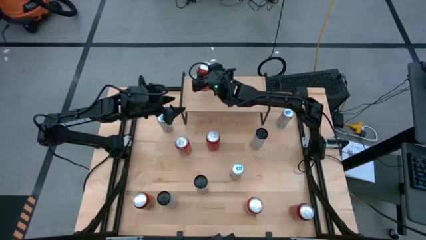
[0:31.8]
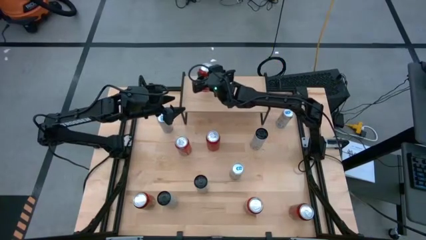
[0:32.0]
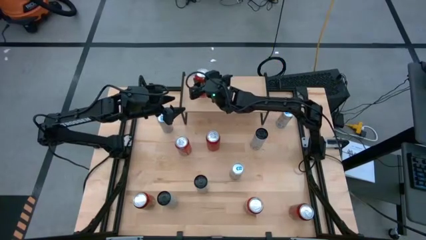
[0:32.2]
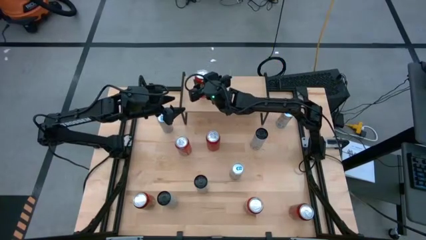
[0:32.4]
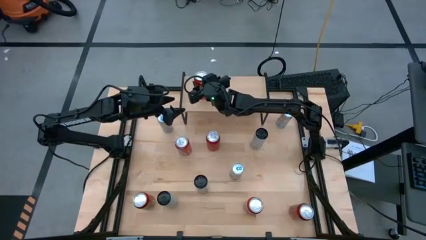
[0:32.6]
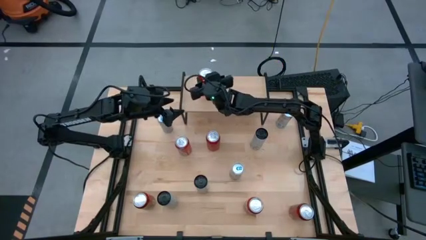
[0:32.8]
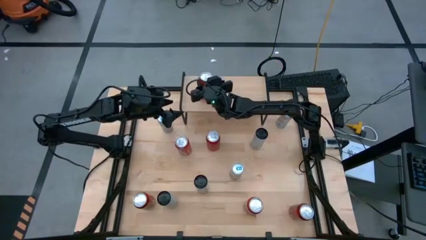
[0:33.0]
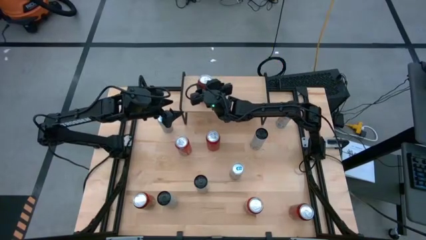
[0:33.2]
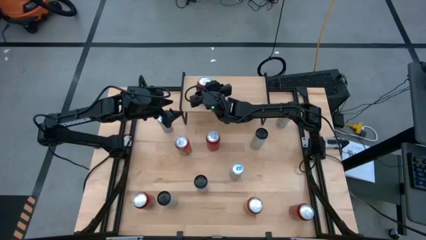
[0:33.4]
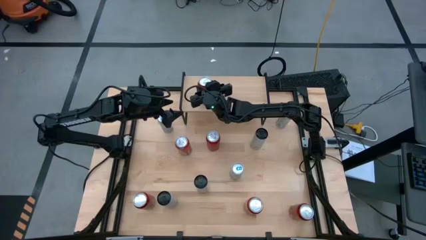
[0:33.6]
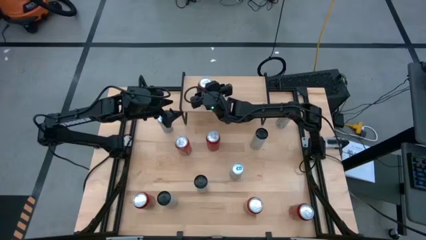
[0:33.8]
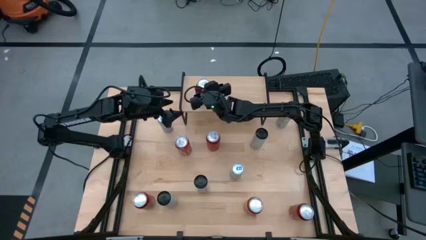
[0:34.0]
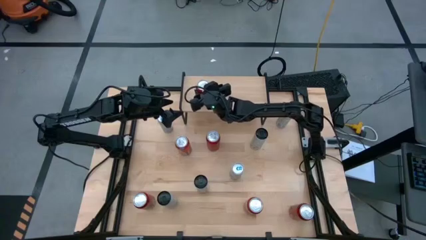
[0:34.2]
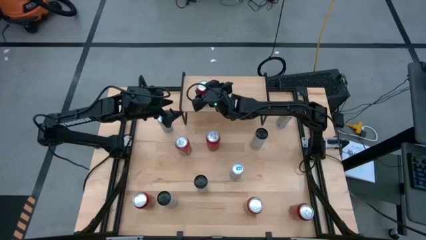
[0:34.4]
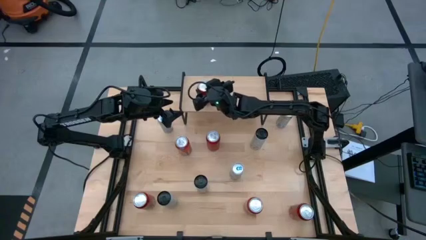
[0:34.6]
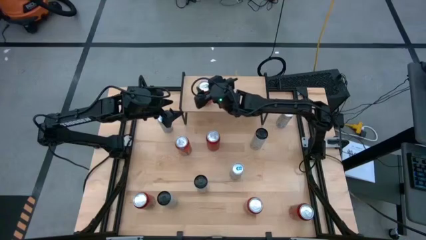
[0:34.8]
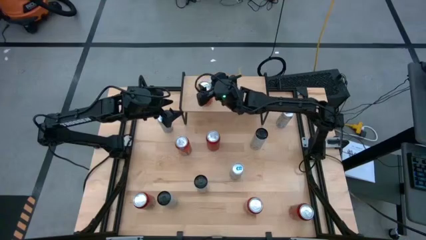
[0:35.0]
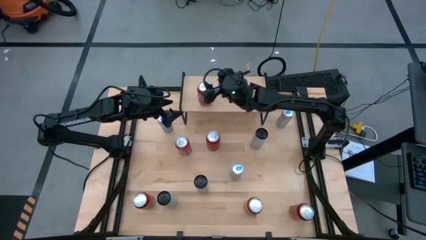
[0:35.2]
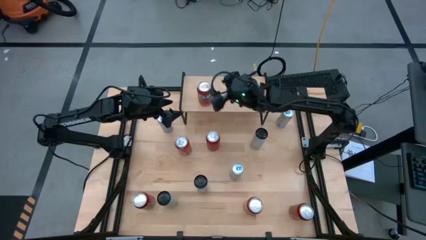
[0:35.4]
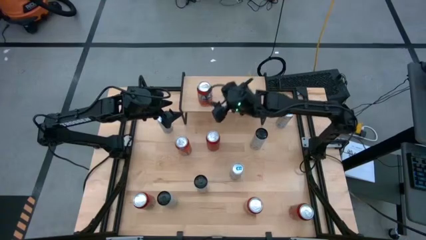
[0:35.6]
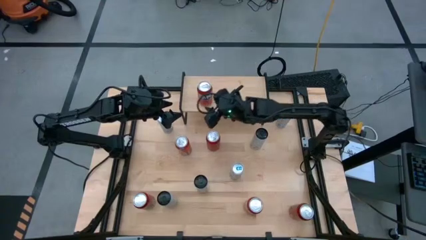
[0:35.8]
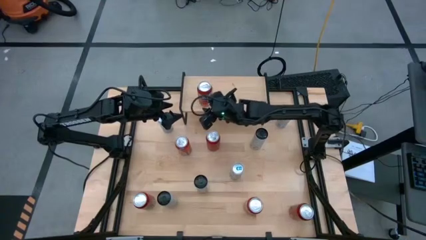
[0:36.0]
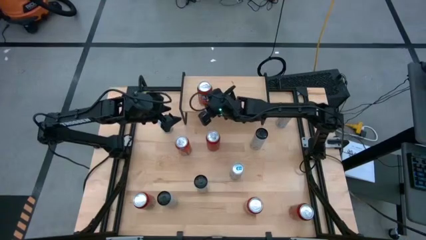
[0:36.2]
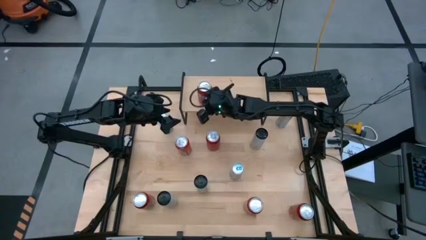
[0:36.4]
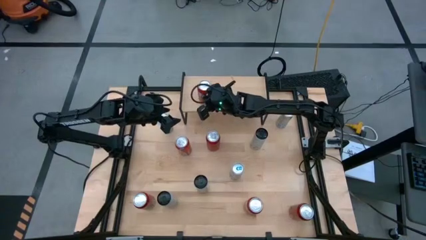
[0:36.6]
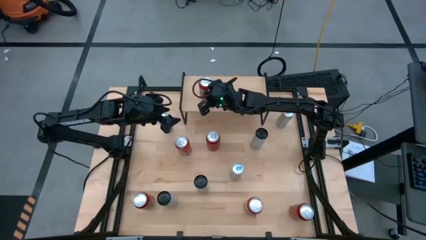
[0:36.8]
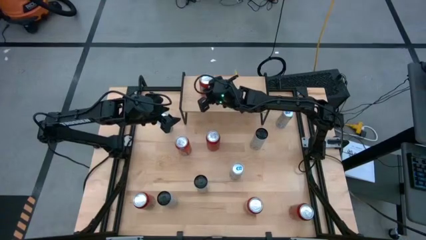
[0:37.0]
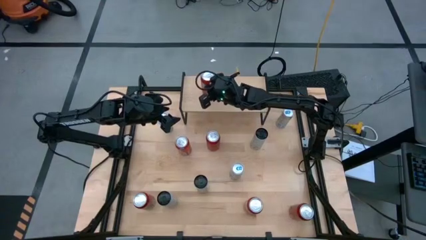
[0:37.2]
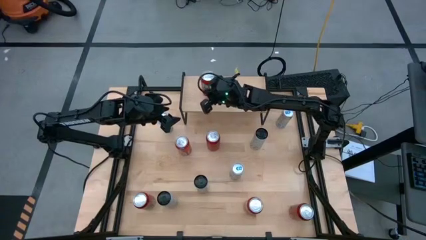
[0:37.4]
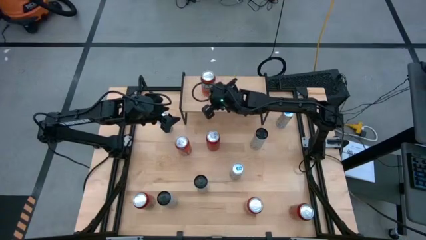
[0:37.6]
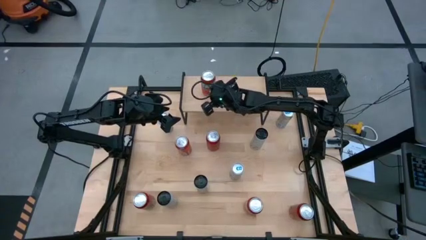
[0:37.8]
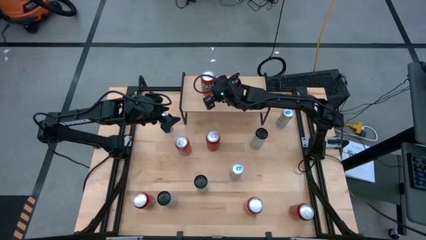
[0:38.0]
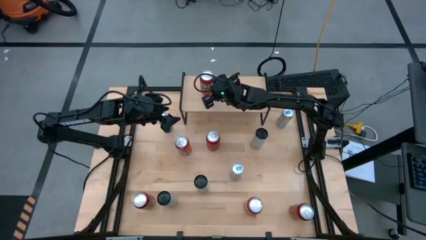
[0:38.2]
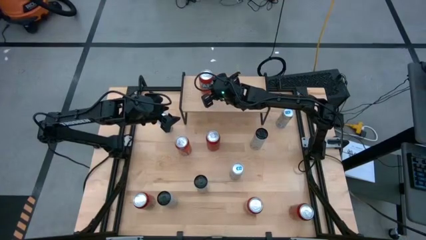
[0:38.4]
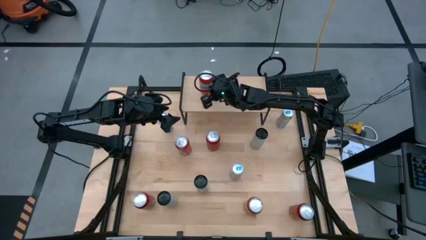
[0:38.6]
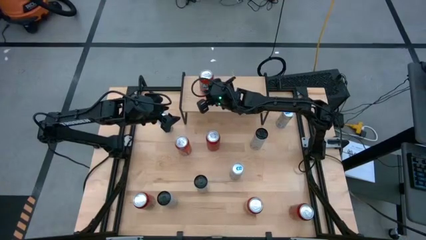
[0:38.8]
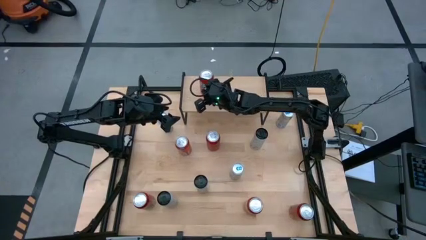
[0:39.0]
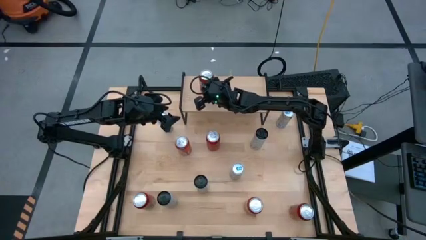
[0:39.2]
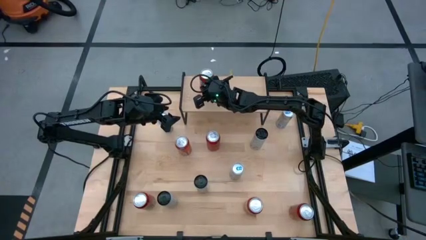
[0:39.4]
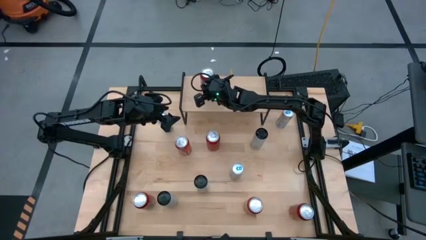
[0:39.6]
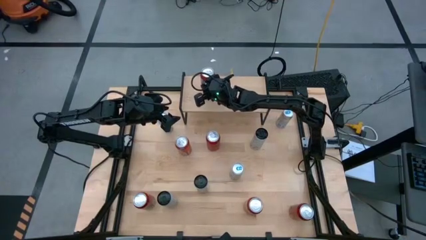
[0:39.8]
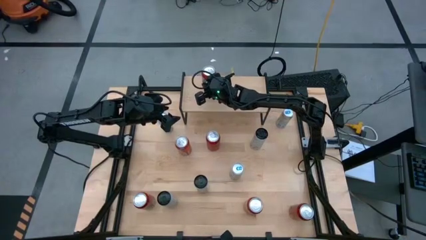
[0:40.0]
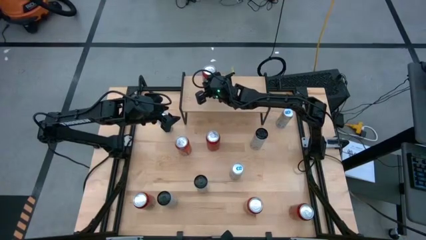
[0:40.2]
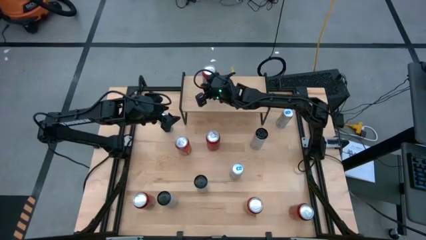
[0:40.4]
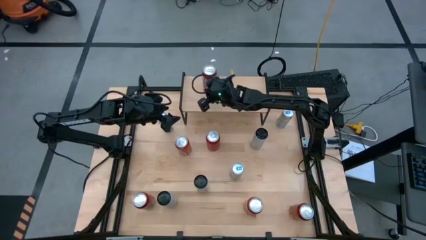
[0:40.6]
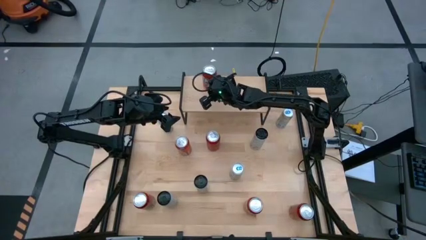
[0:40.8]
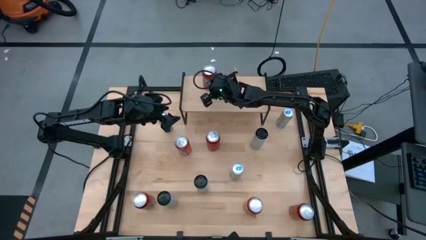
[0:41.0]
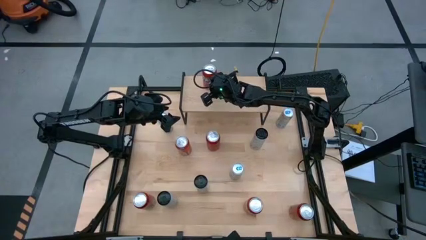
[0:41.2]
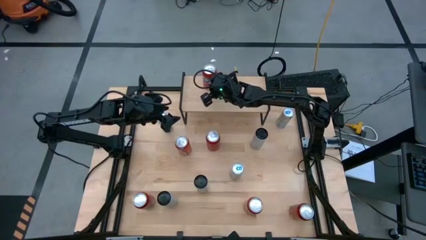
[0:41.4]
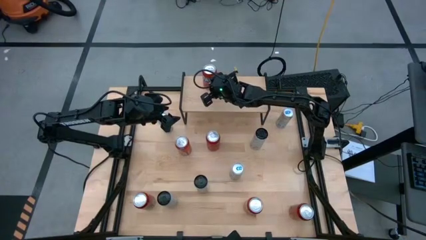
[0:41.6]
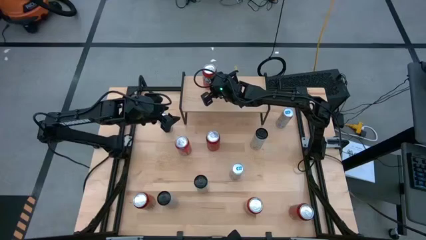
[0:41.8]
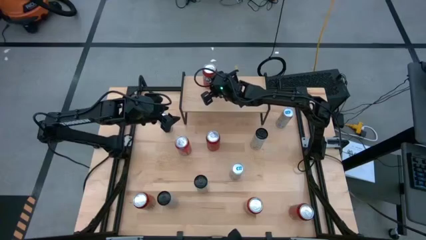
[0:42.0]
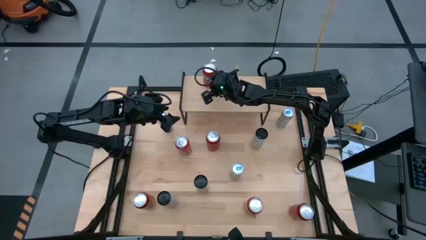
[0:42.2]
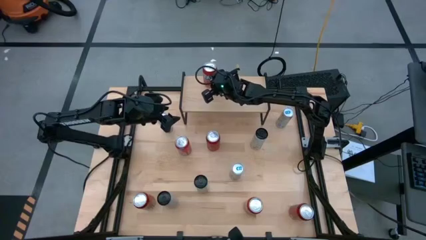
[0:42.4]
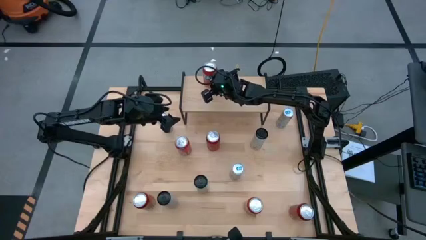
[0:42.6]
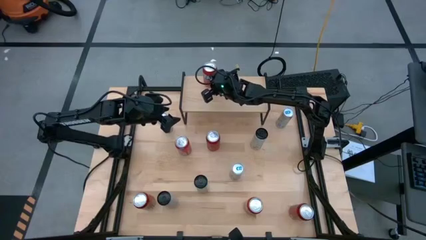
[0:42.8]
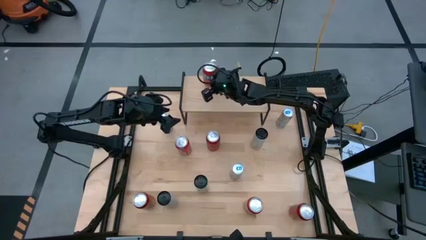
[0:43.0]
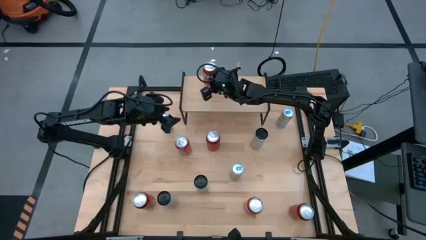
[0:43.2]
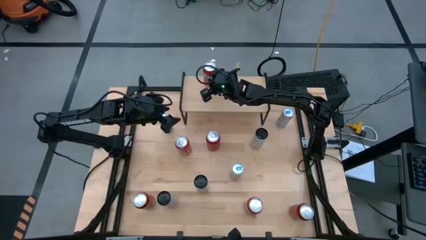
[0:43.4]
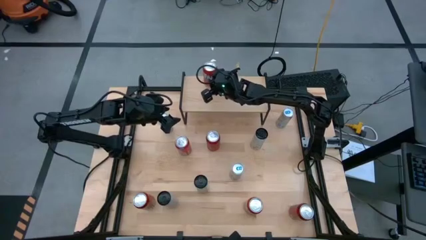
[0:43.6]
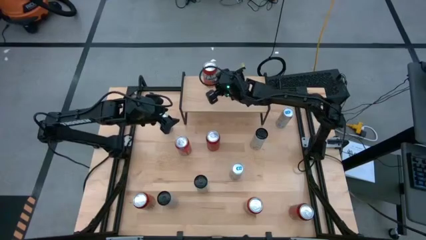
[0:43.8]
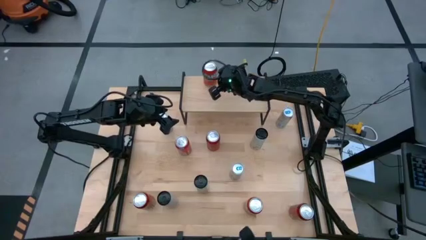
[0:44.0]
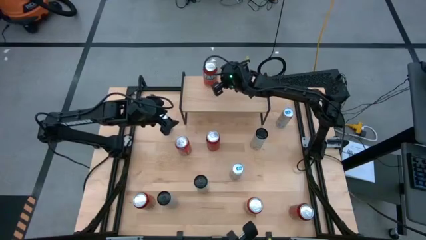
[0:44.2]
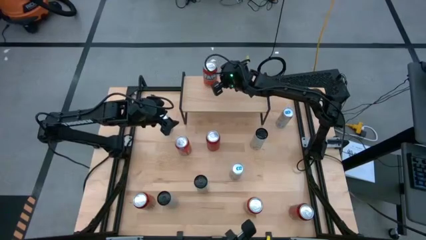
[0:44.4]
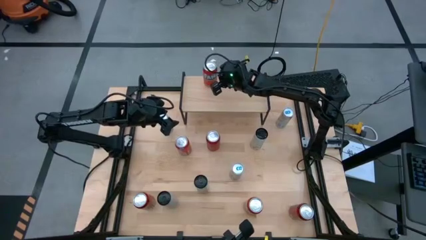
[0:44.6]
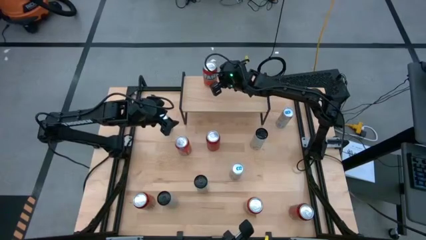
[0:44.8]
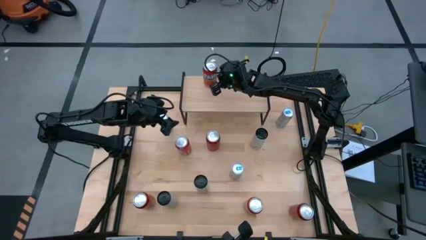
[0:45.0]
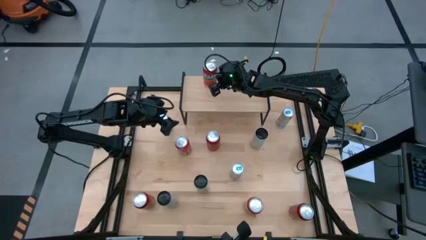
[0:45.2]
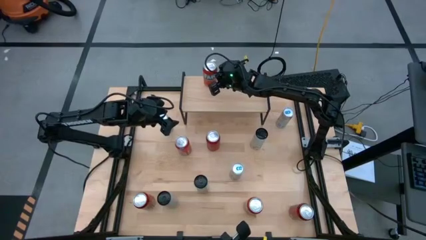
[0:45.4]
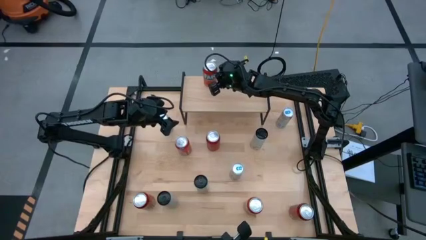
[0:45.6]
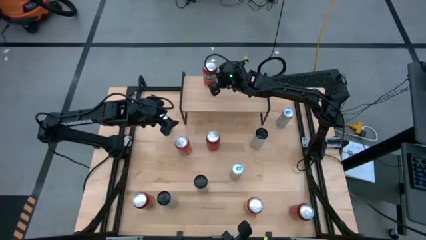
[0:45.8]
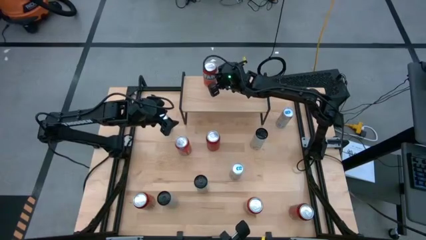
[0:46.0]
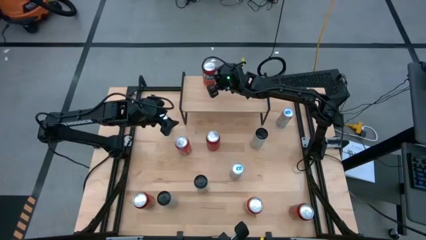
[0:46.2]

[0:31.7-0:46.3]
Task: Place canned beverage on shelf
Put the middle red soda can on the shelf

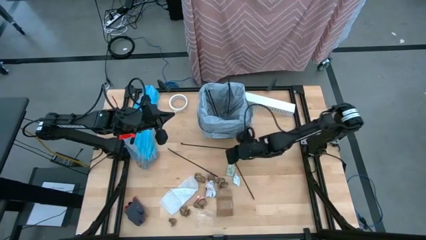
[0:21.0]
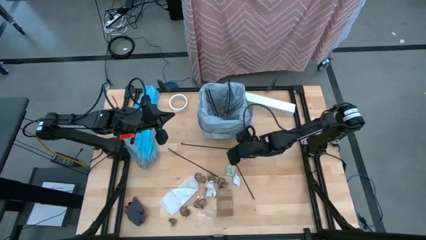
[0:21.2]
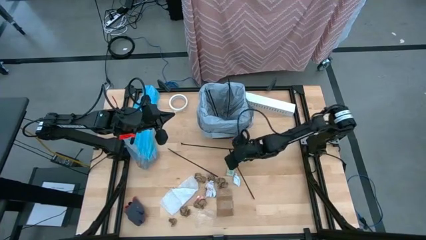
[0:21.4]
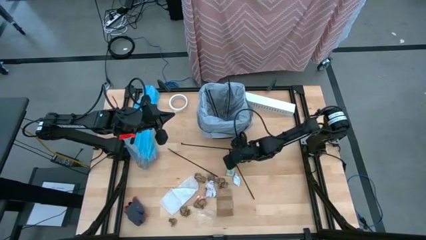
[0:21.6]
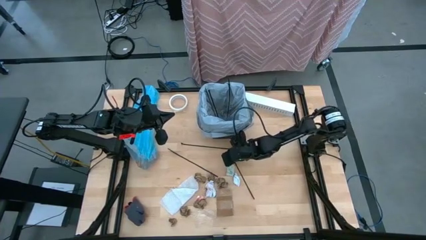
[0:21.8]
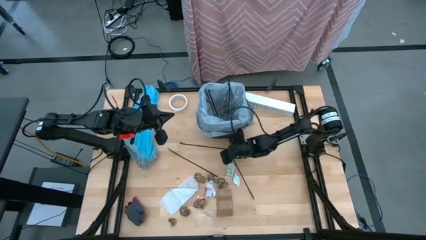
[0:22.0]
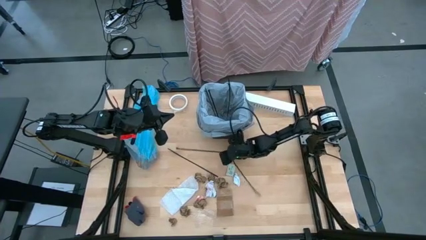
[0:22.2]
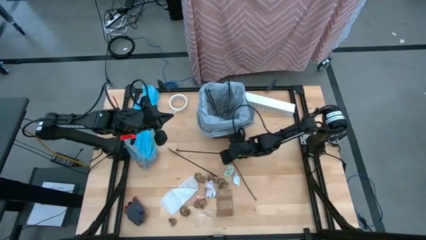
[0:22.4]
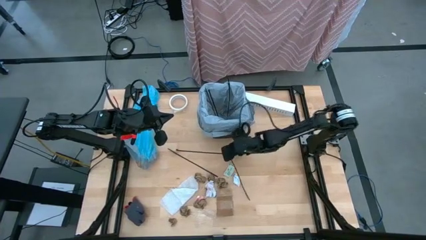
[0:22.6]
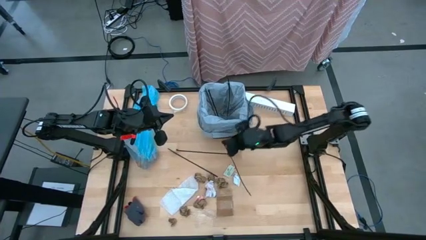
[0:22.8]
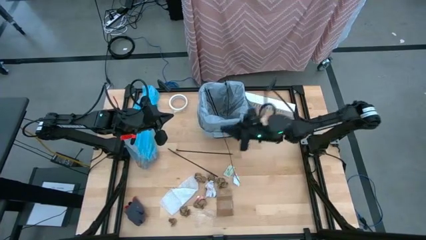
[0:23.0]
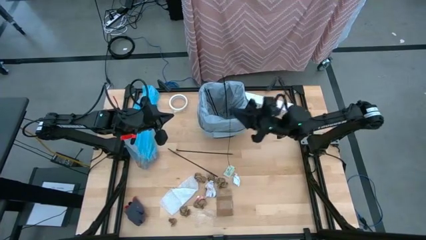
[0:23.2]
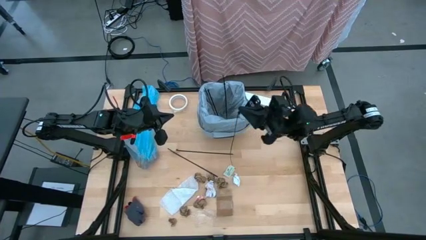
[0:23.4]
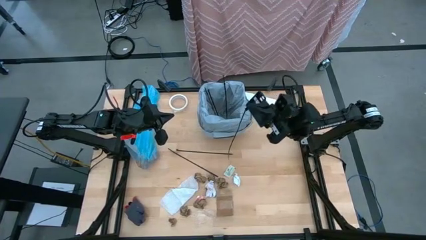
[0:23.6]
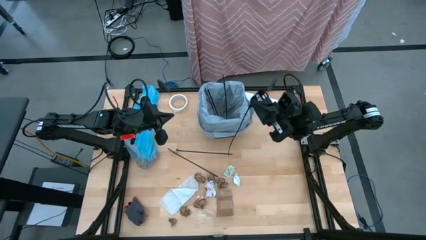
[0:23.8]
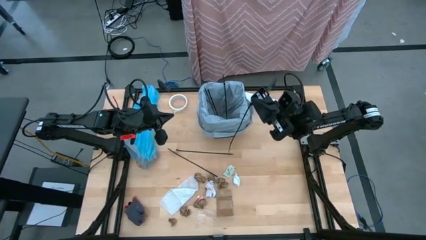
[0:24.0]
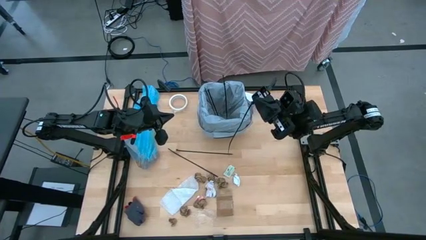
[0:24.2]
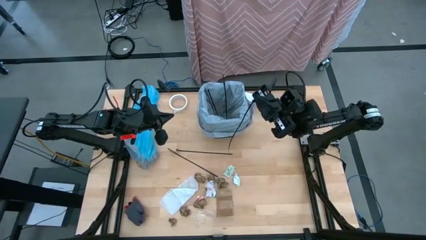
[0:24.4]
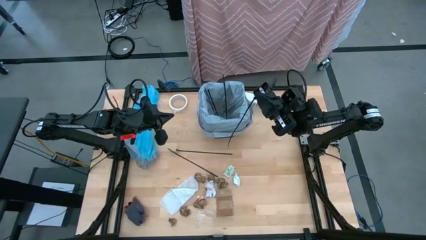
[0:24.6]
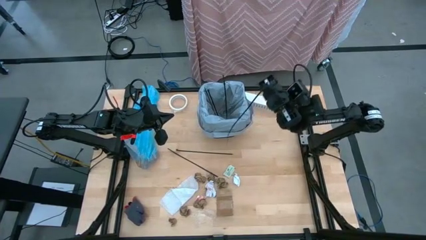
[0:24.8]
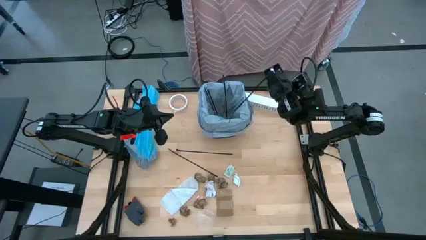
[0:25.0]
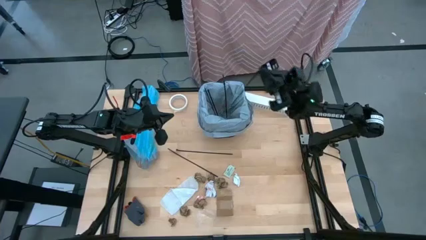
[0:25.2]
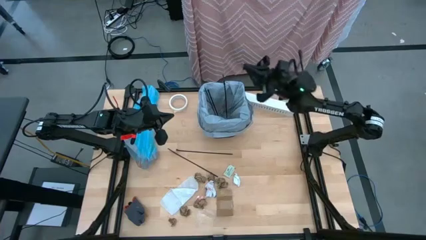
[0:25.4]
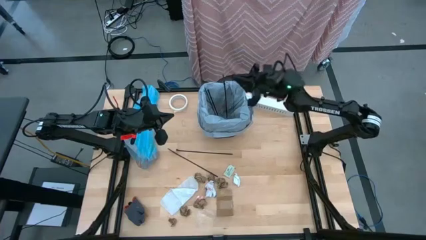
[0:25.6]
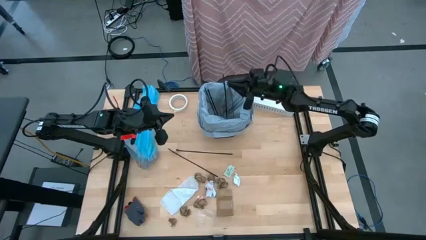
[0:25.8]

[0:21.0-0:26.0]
Task: place trash/remove bag and relplace
Put the zip tie into the trash bin
